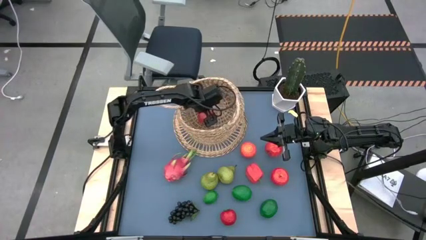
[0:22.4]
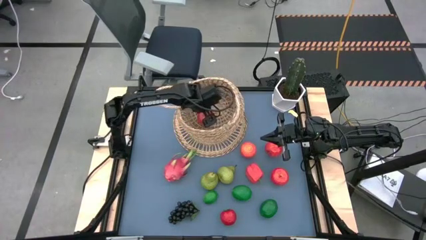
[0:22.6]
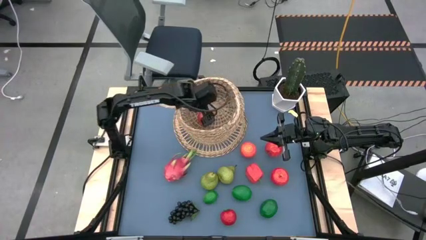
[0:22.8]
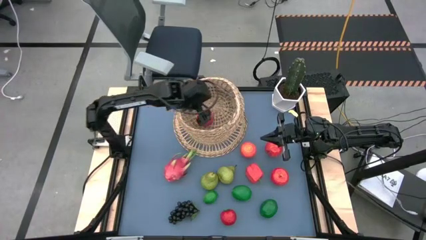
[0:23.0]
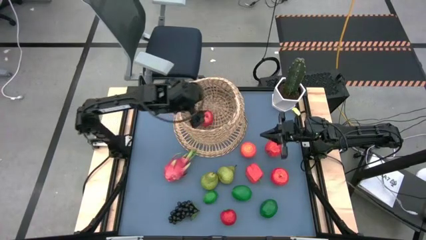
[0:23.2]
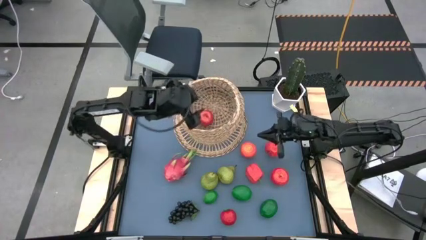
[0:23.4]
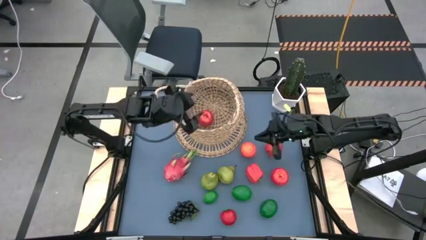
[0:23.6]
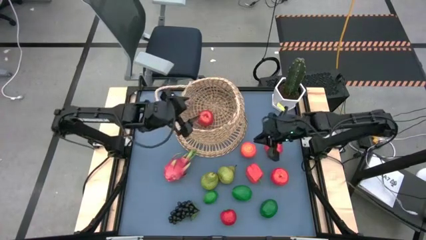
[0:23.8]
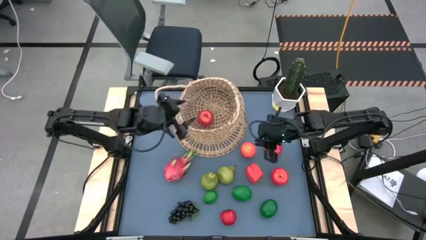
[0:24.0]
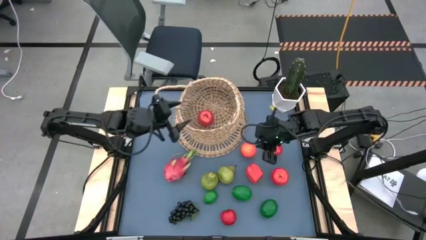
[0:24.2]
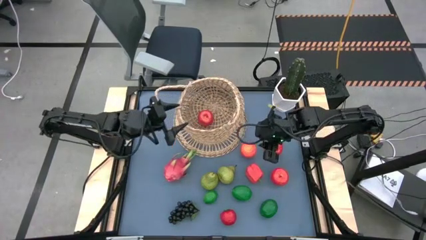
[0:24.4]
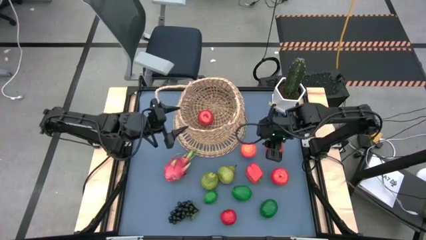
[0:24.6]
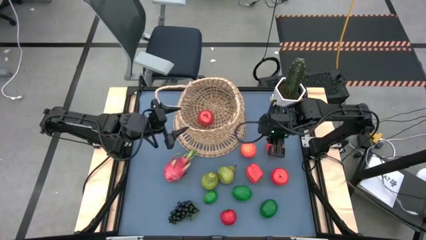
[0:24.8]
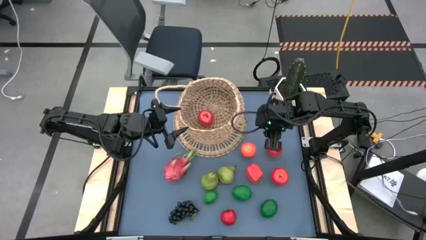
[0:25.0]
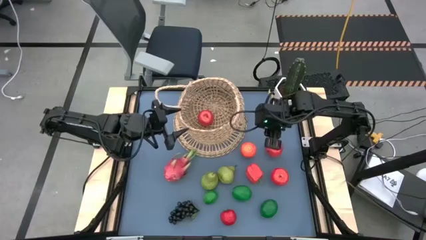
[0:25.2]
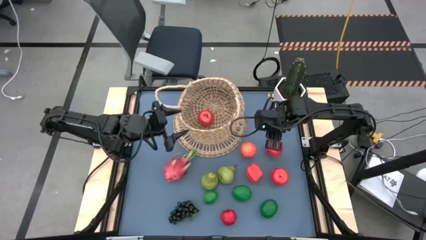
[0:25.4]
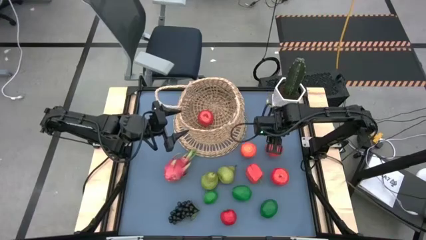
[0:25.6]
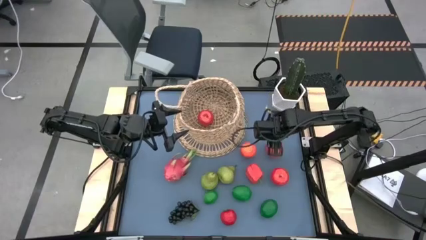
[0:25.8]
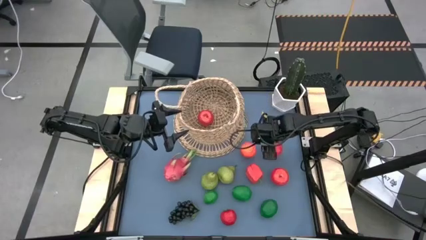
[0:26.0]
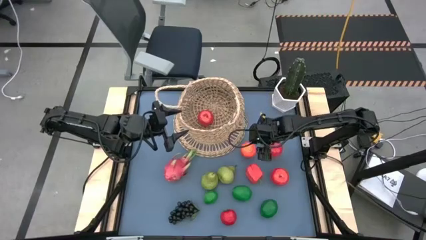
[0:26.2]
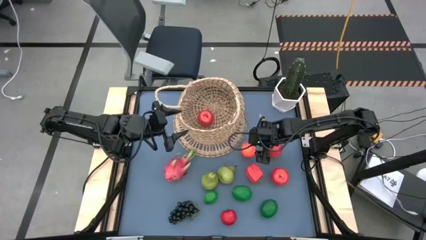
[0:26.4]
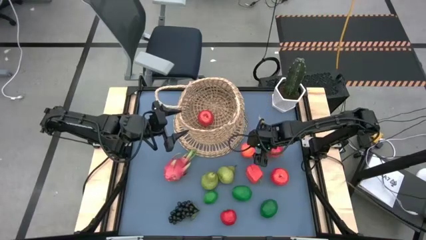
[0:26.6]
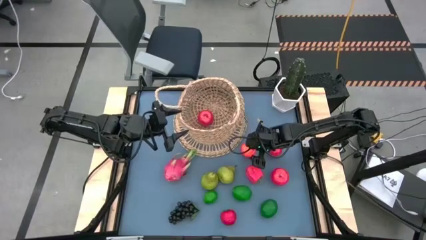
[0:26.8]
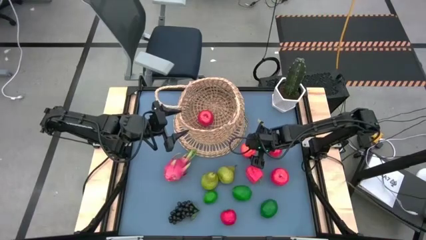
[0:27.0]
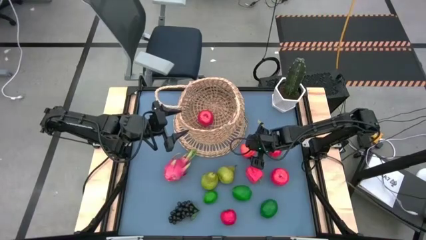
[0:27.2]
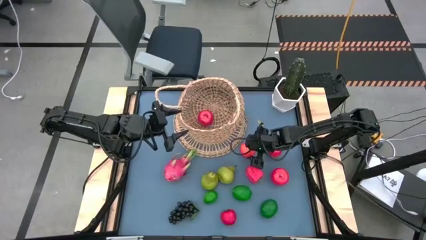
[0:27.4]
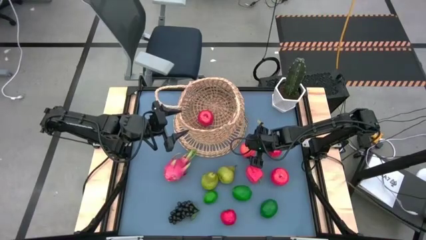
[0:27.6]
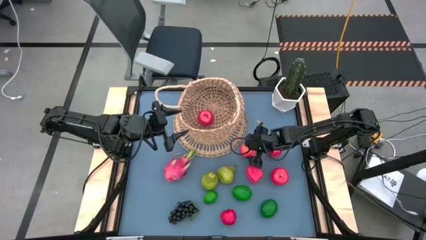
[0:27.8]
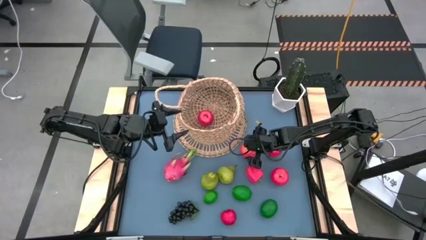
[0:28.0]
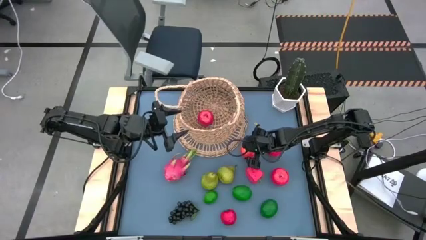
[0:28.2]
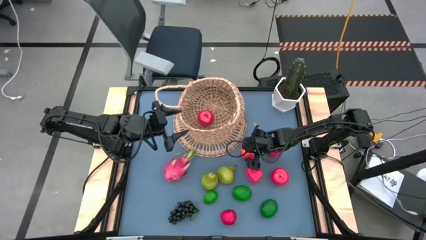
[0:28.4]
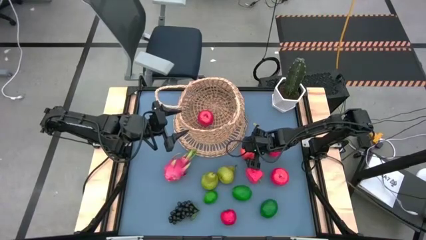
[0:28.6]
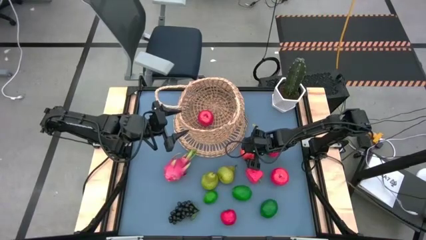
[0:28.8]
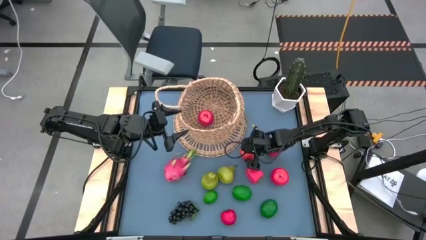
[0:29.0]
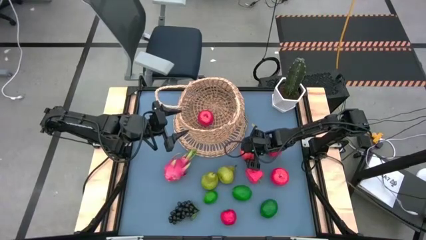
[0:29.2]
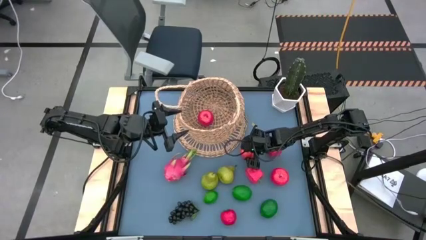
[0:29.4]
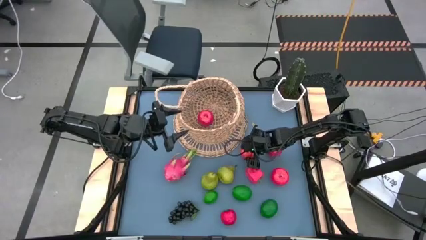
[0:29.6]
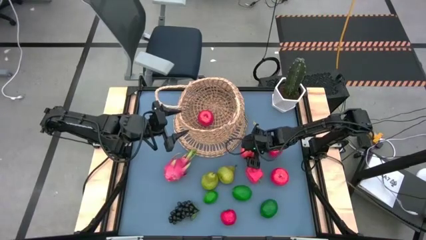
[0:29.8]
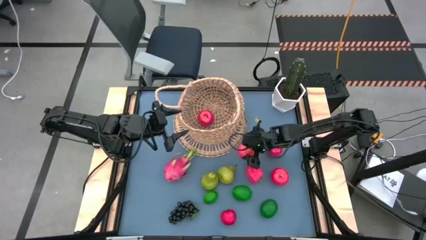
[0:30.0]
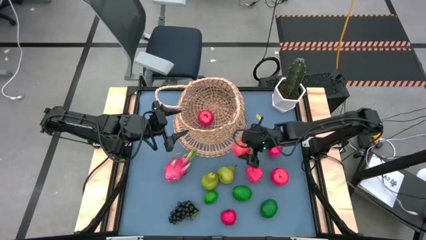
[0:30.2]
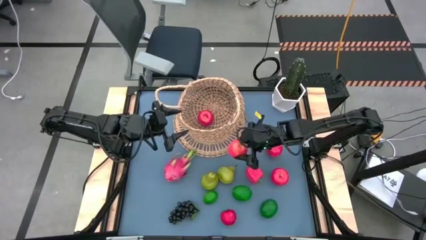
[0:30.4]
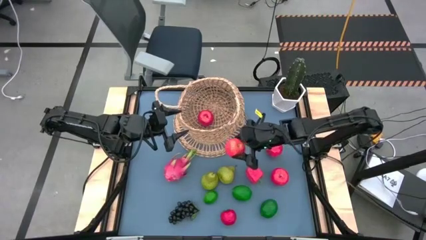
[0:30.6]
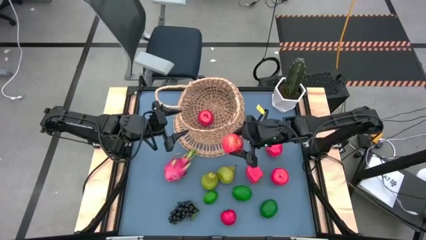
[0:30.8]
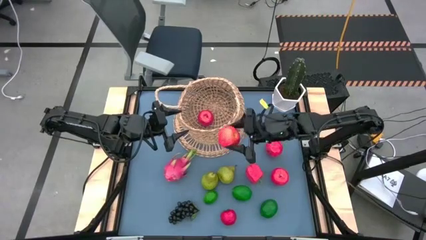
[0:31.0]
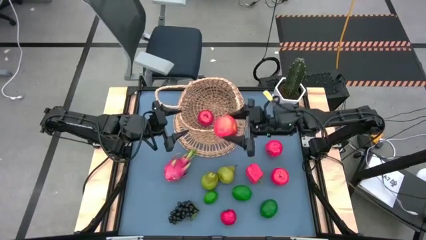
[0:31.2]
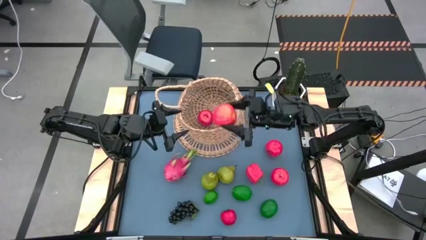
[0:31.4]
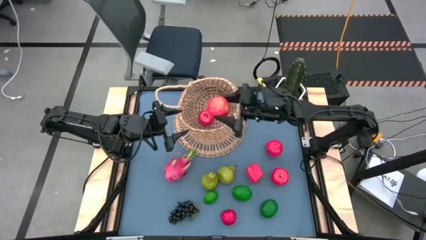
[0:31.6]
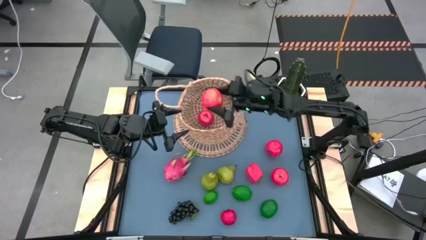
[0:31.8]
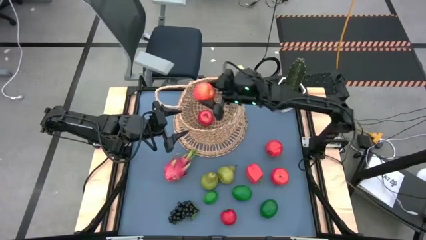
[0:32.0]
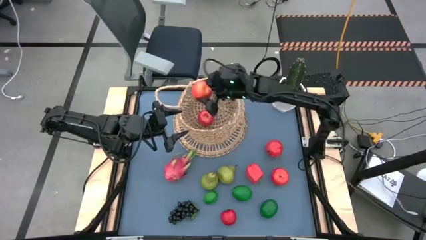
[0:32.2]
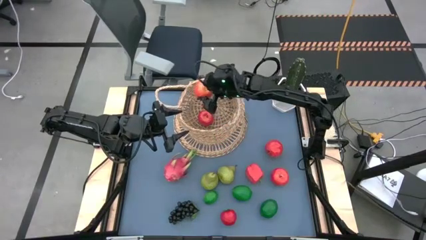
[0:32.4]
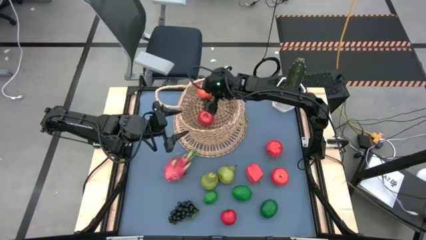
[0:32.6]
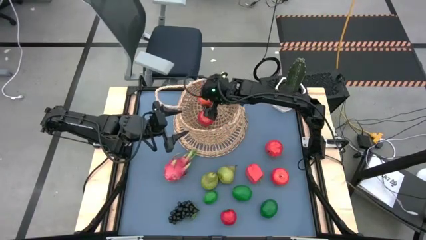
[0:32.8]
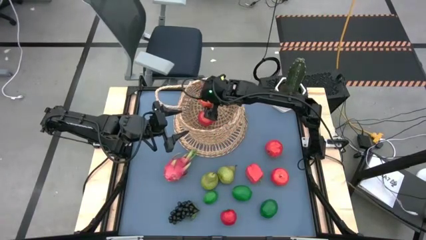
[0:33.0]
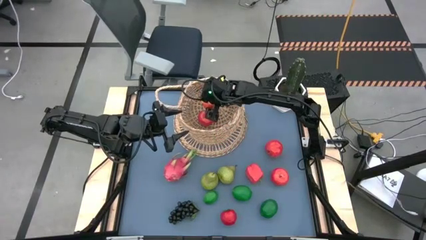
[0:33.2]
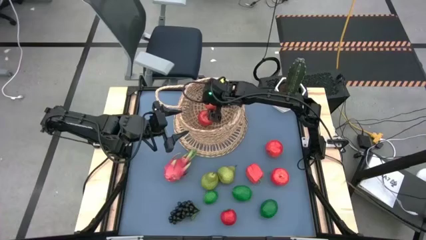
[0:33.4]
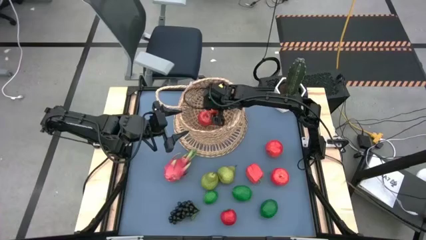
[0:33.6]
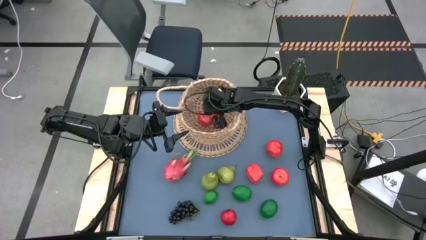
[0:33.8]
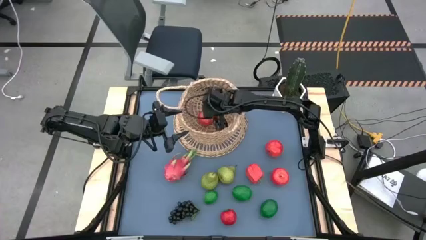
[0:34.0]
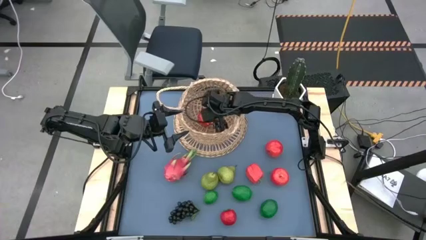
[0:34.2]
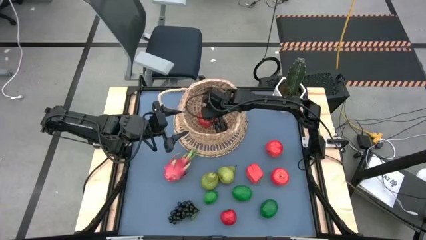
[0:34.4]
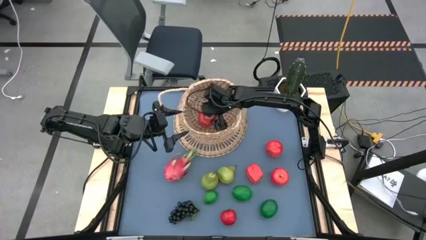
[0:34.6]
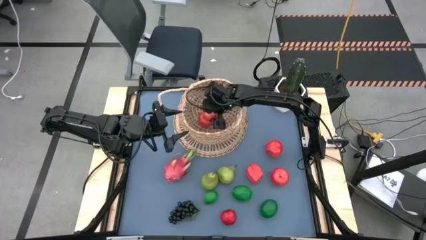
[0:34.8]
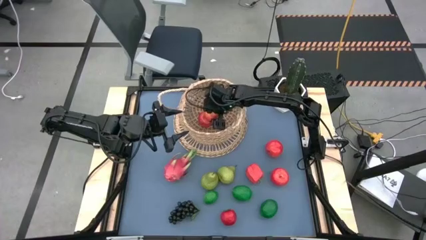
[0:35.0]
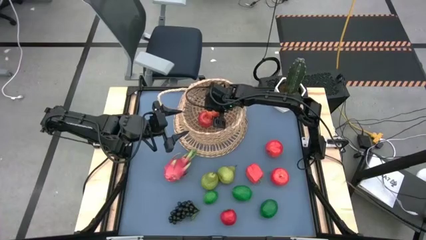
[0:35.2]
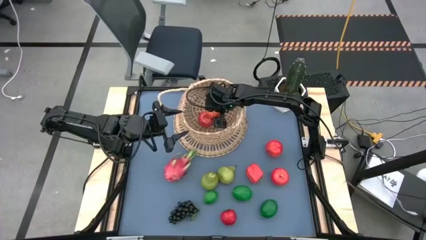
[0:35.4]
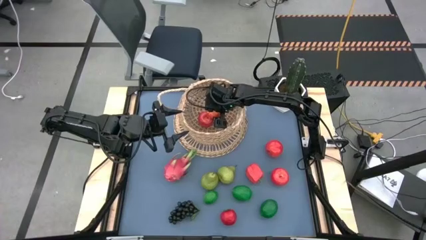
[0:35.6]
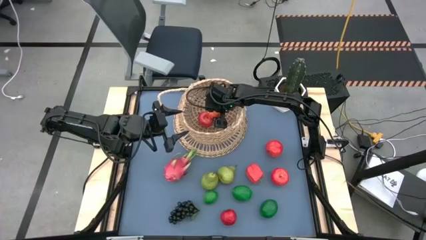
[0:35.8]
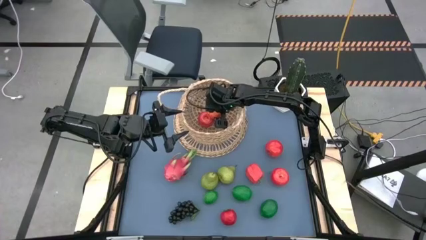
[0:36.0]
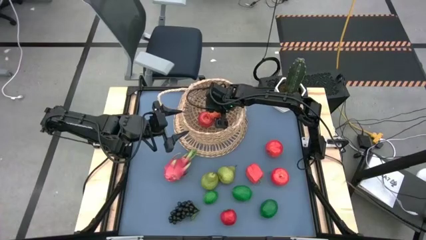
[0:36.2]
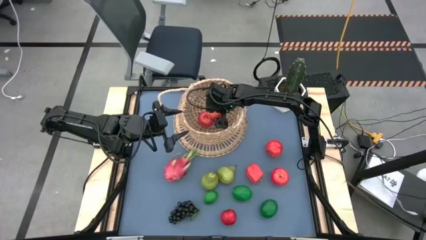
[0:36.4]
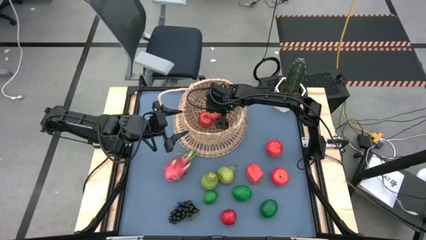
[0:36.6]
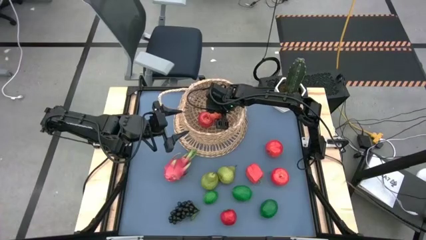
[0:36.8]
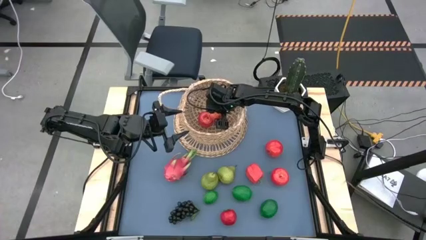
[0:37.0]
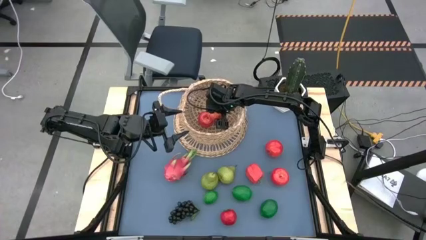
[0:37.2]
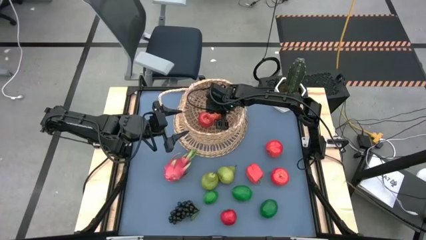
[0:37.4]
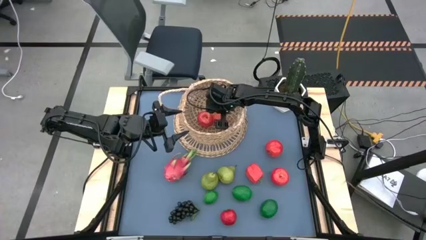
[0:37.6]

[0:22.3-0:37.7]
Task: Build produce basket
Put the apple into the basket
